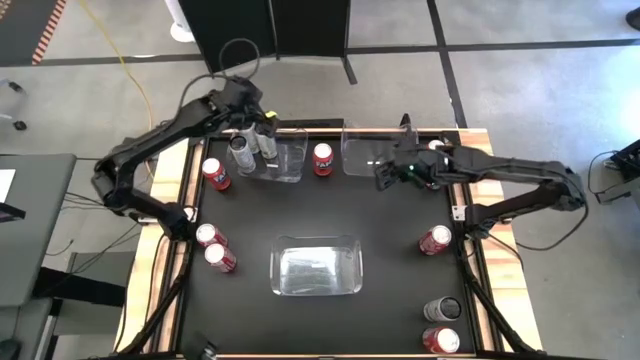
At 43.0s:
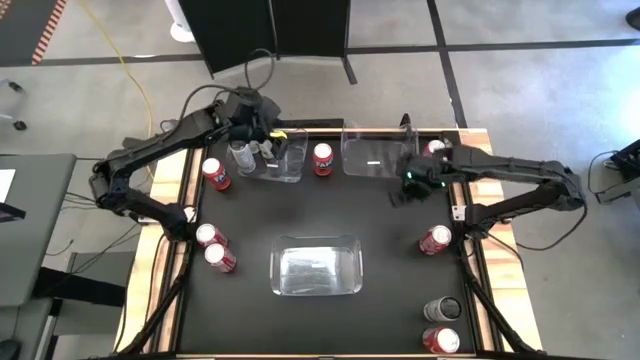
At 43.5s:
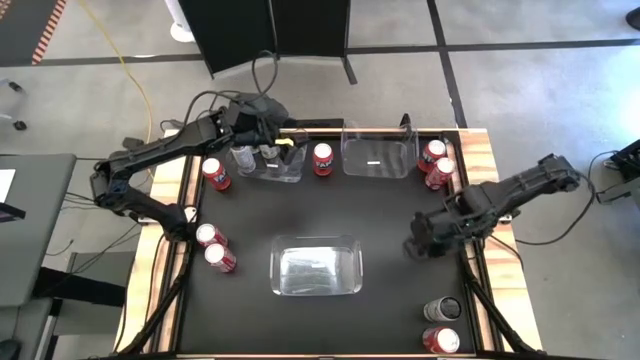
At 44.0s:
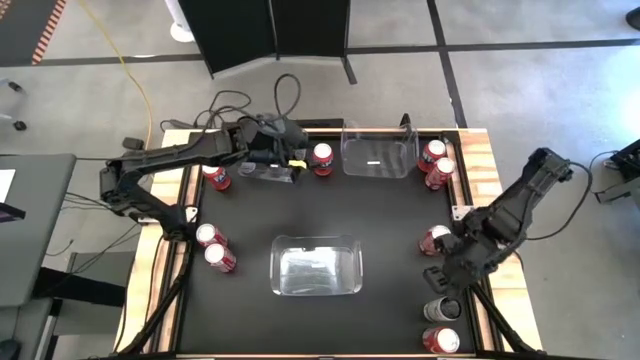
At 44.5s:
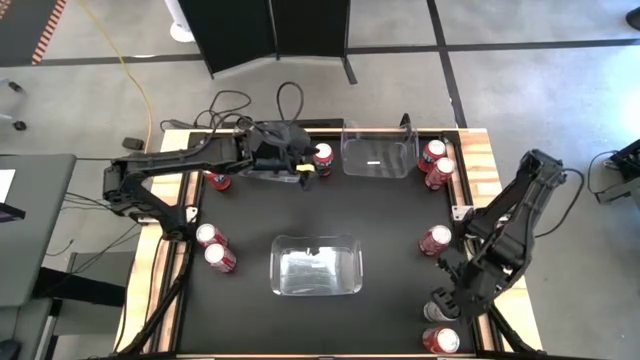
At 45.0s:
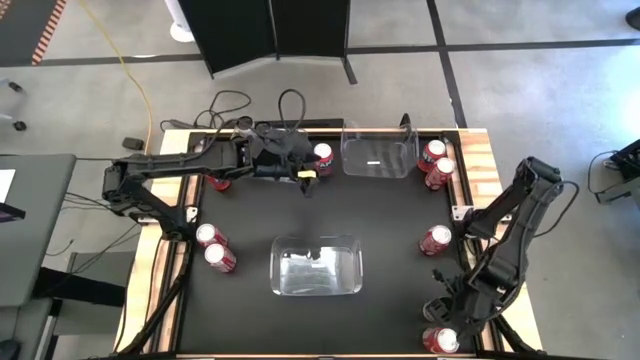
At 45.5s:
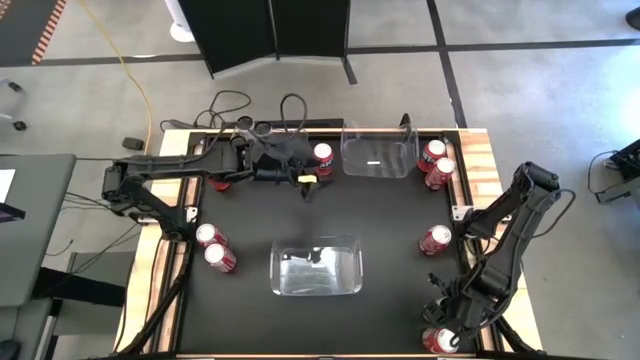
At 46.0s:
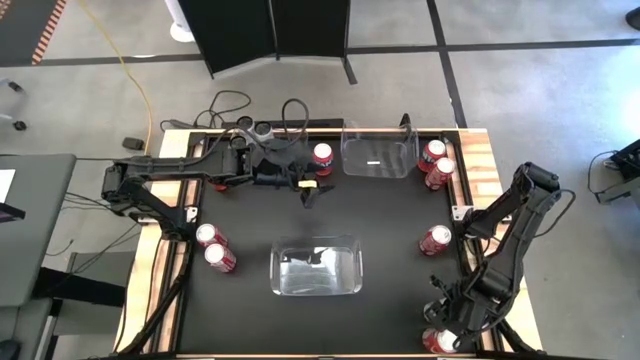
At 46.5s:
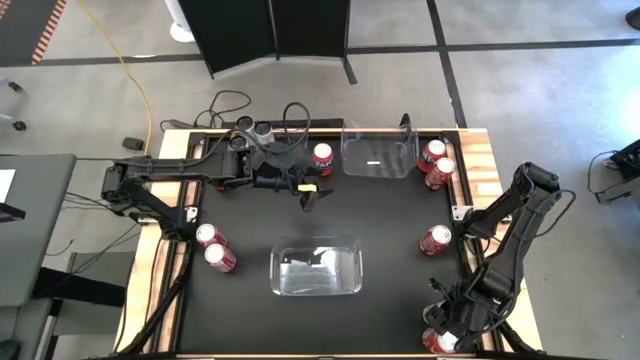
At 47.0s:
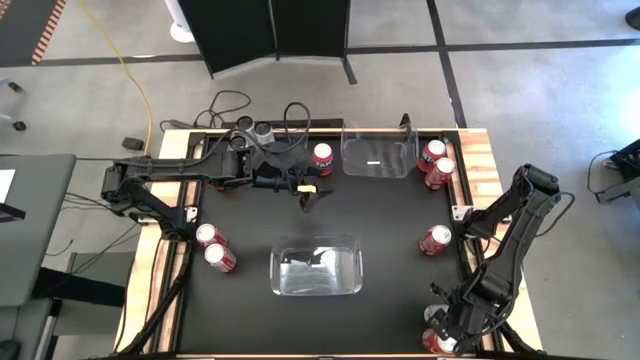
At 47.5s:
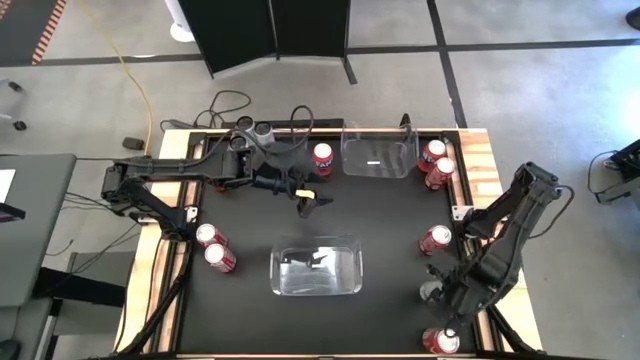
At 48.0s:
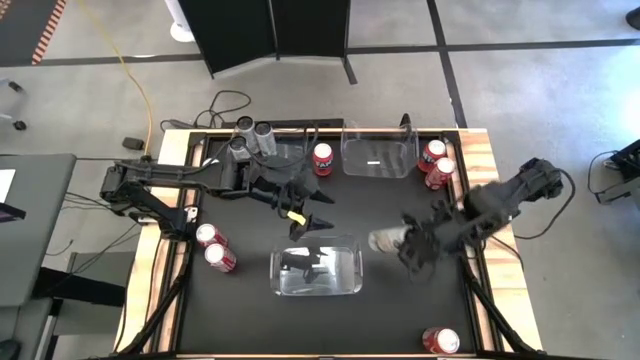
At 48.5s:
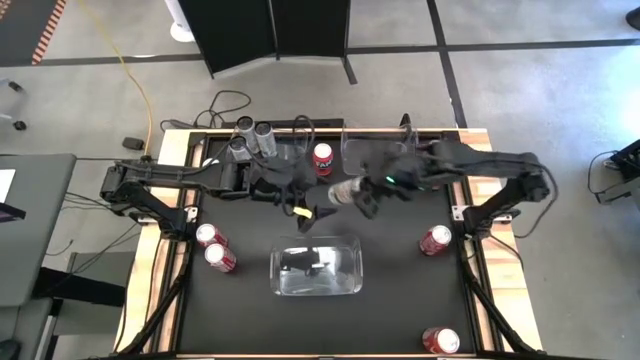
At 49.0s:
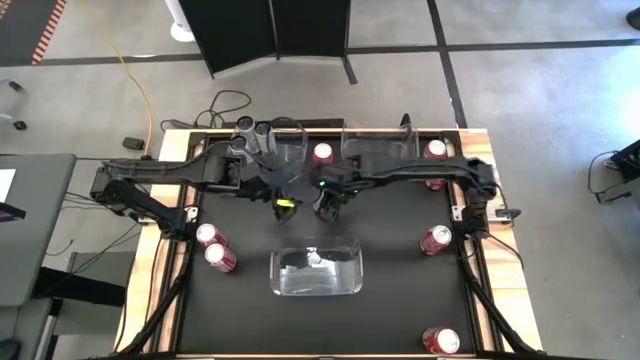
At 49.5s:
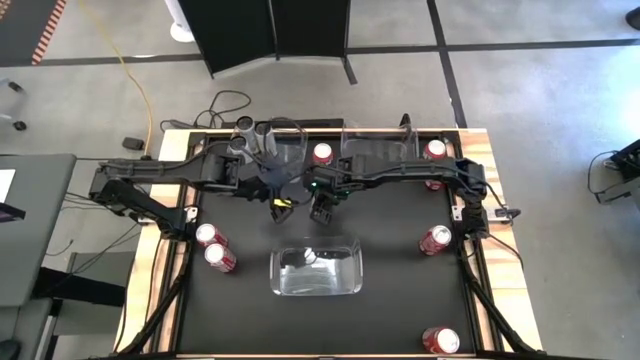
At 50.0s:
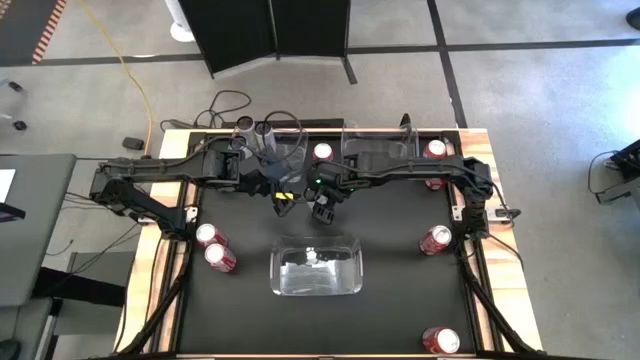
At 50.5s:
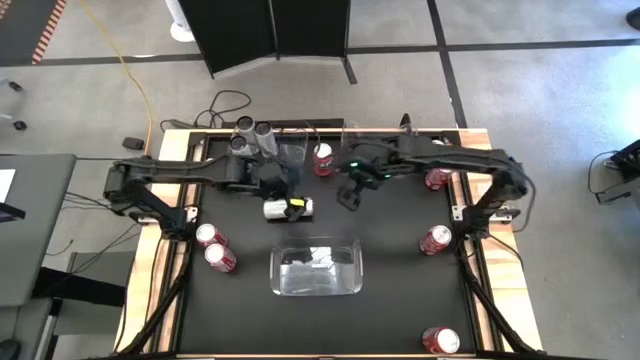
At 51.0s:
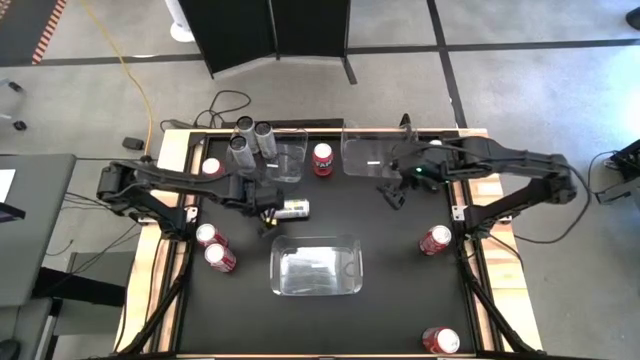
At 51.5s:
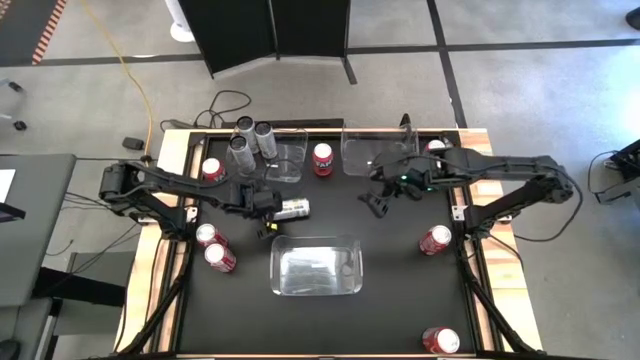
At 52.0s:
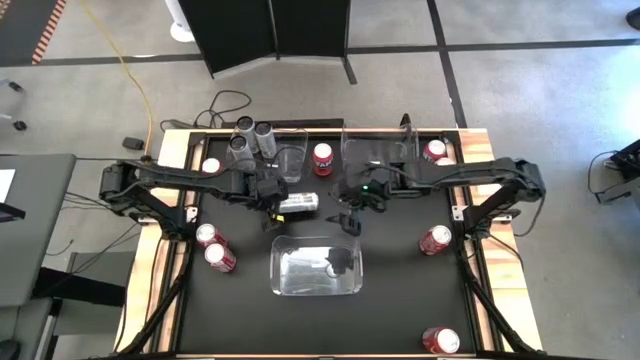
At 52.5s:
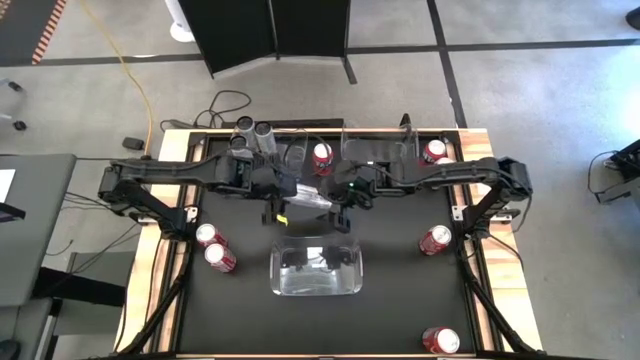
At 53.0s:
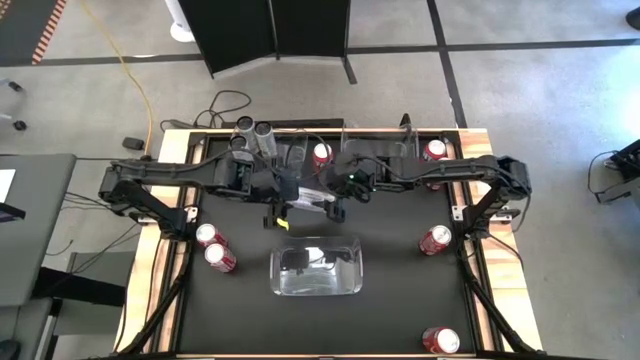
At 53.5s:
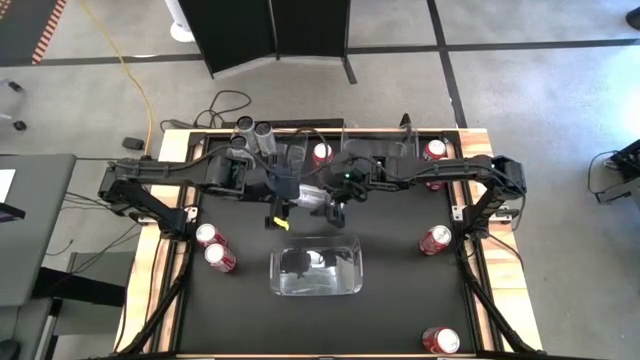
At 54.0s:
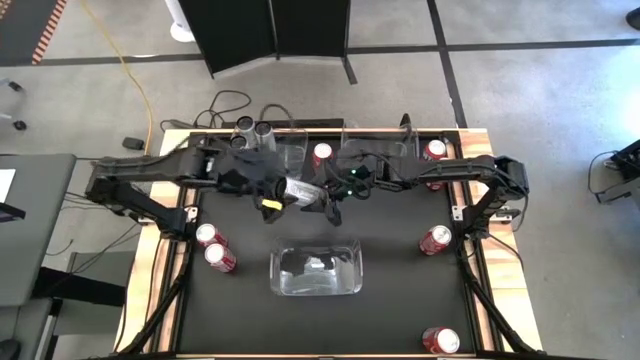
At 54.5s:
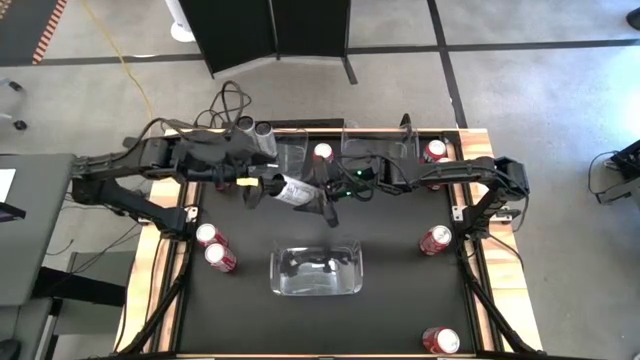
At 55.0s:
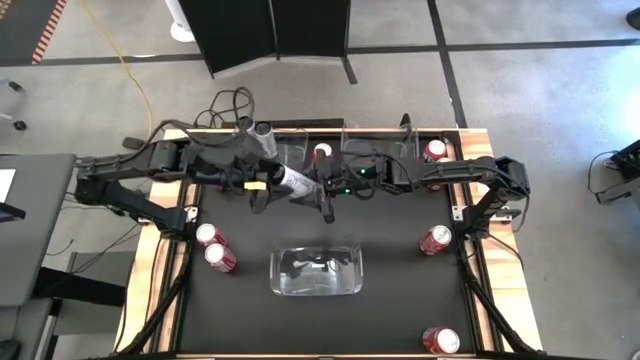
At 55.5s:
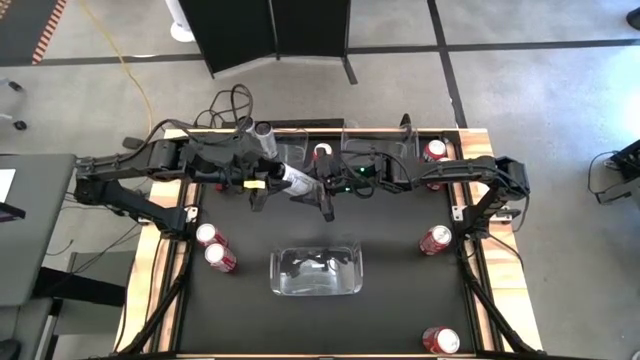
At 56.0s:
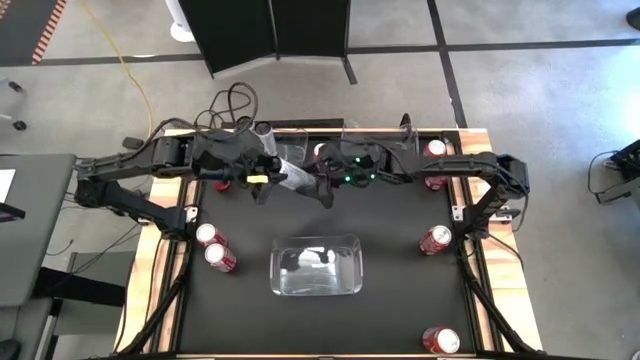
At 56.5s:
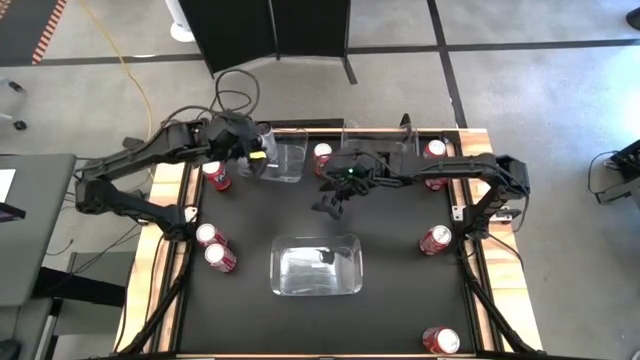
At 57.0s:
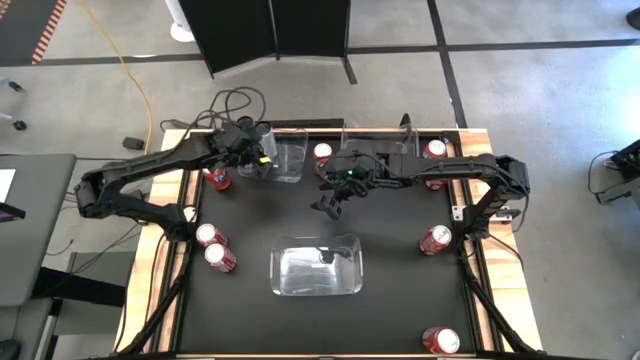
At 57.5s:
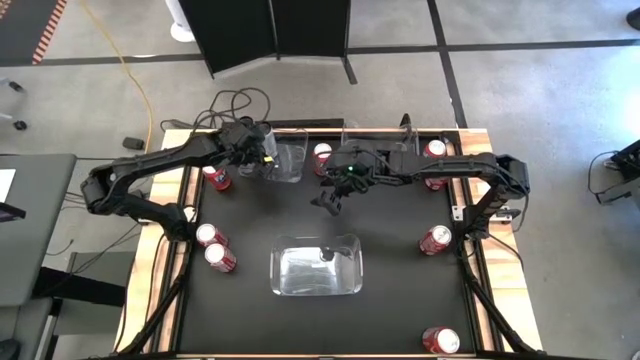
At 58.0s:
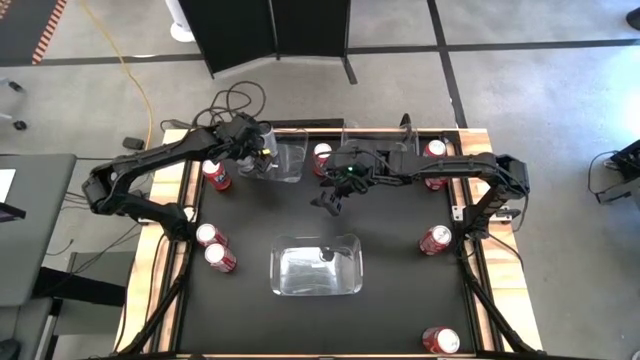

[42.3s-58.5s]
Task: Sort soda cans
Put the white-yellow soda can into the top left transparent bin

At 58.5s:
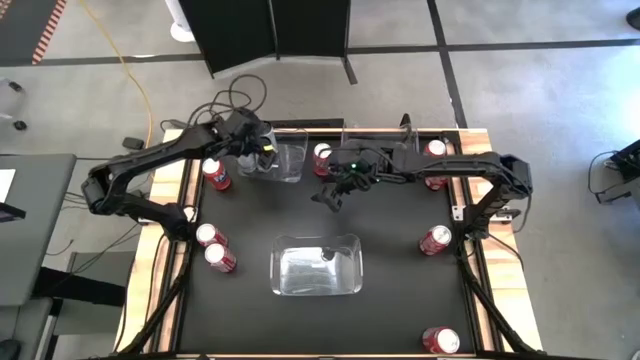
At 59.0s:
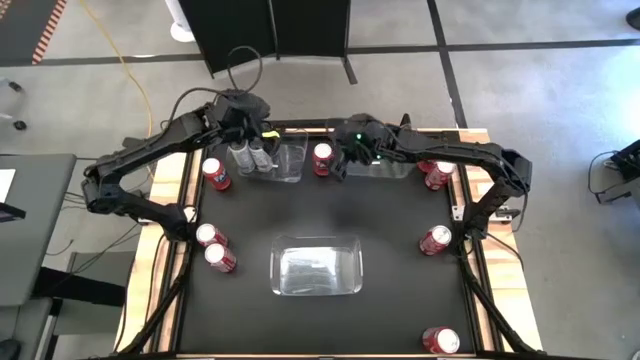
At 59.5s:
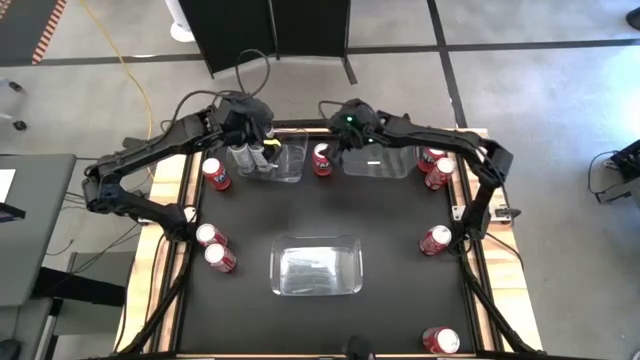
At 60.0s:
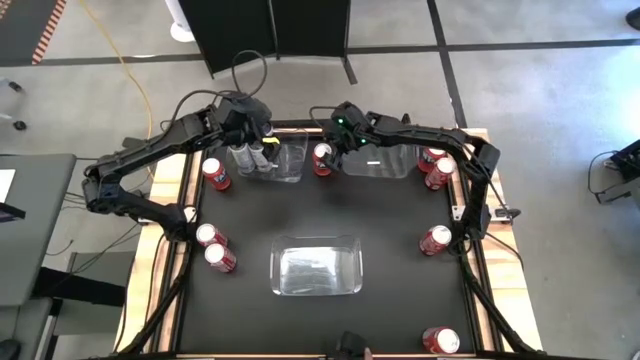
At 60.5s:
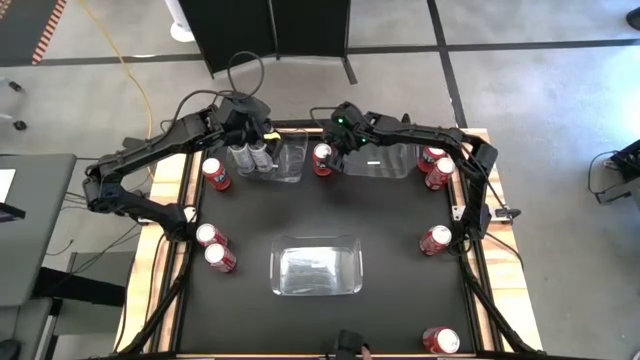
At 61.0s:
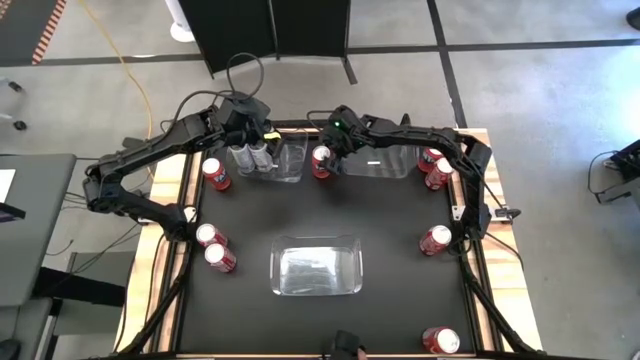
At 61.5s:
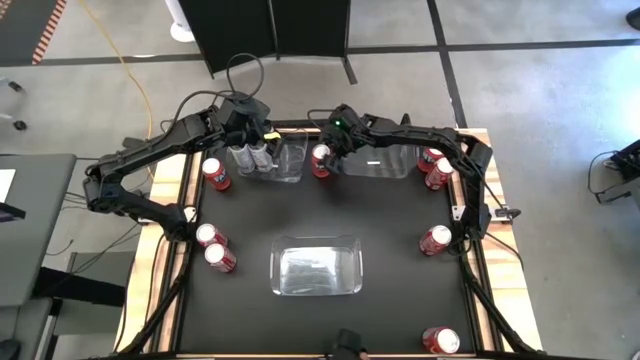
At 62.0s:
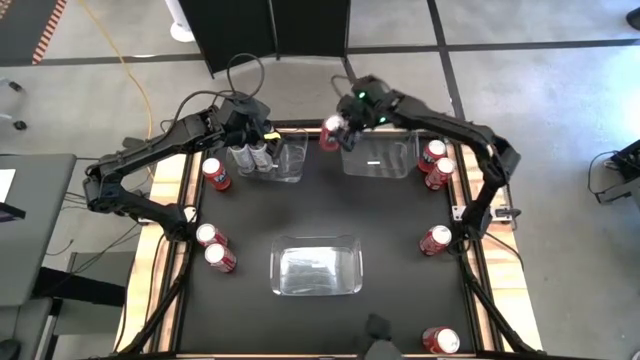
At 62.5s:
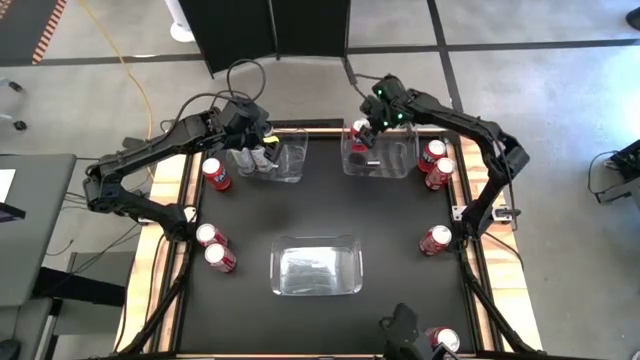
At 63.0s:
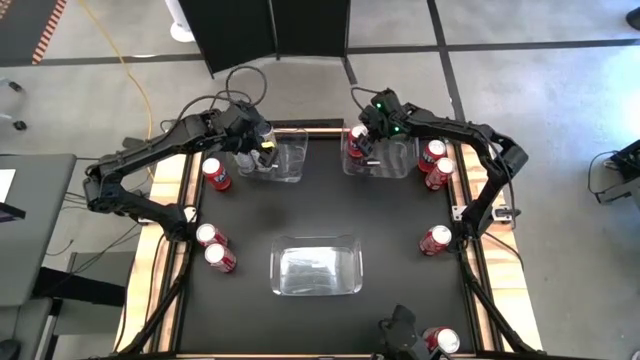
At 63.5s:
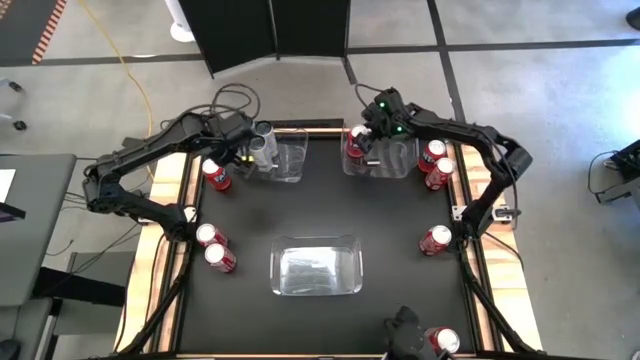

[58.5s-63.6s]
Put the top center red soda can into the top right transparent bin
